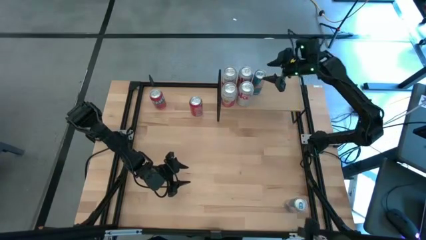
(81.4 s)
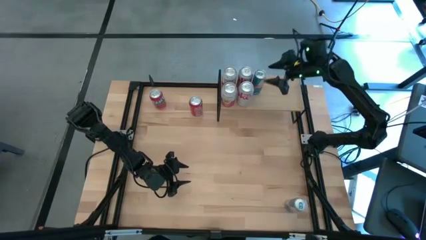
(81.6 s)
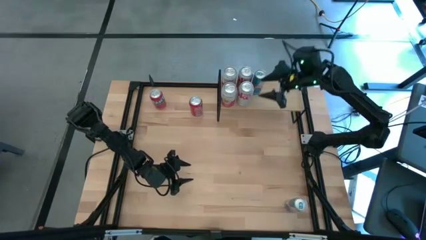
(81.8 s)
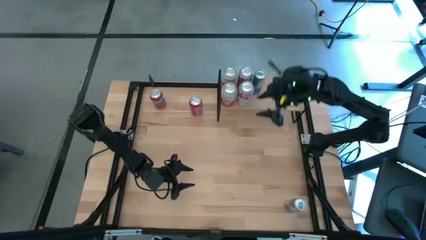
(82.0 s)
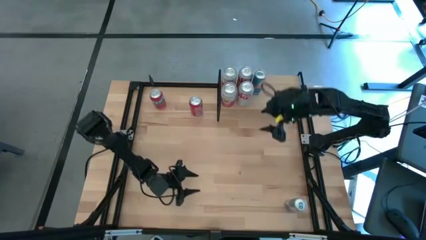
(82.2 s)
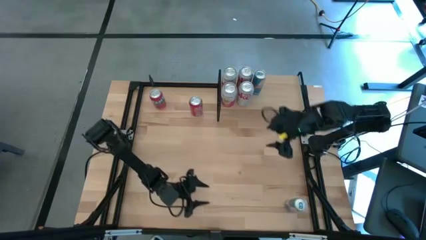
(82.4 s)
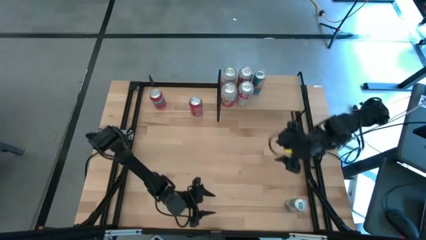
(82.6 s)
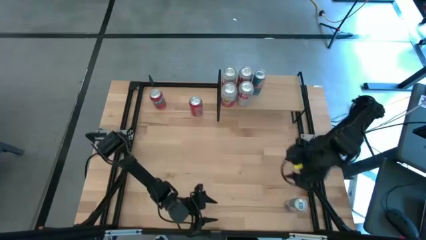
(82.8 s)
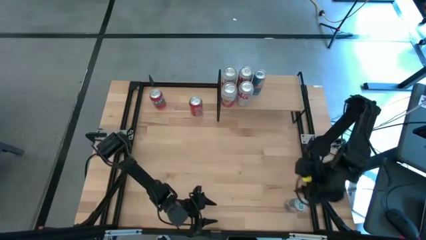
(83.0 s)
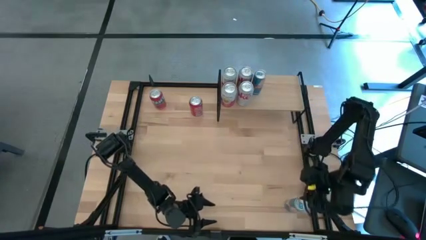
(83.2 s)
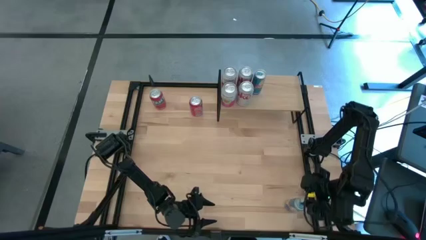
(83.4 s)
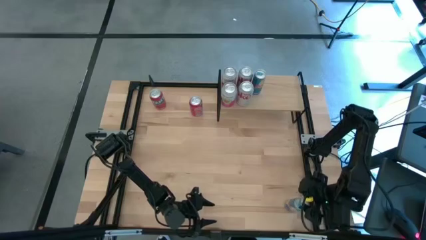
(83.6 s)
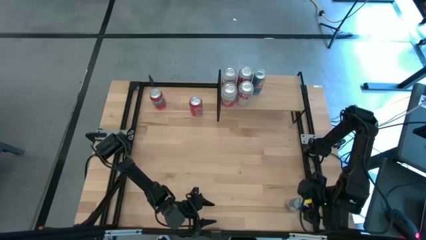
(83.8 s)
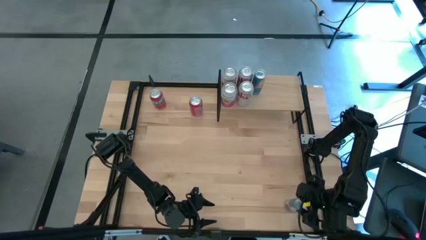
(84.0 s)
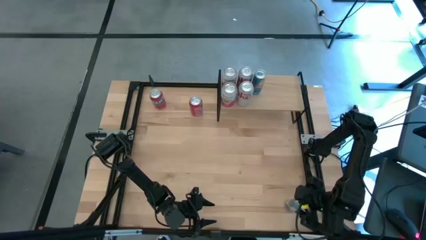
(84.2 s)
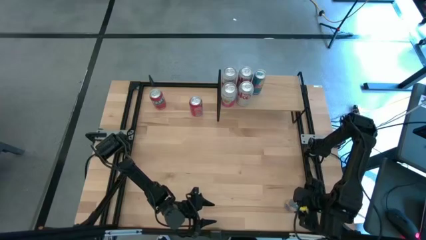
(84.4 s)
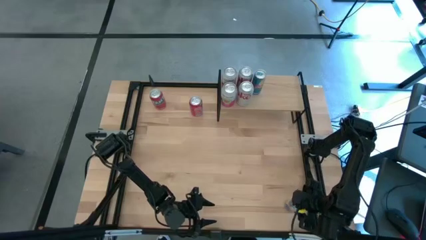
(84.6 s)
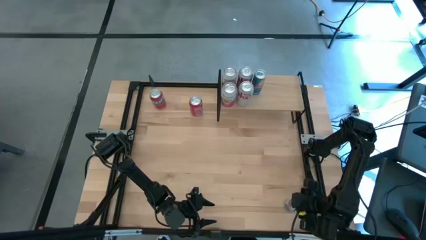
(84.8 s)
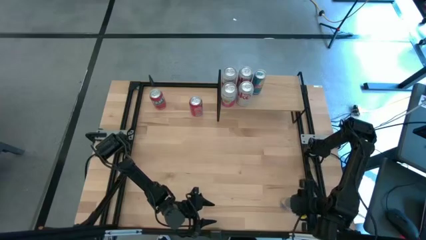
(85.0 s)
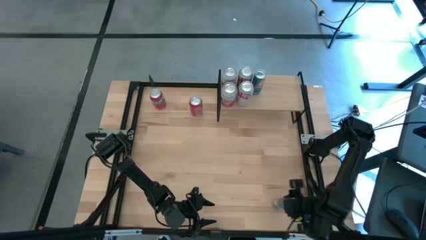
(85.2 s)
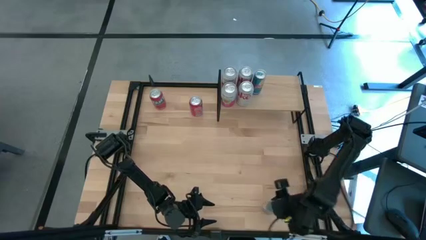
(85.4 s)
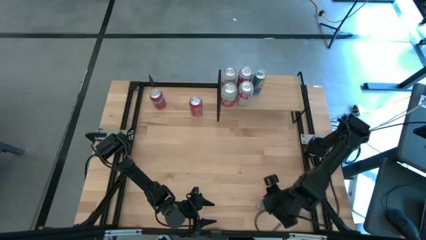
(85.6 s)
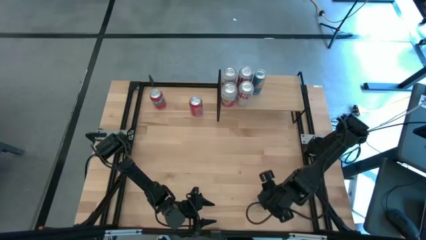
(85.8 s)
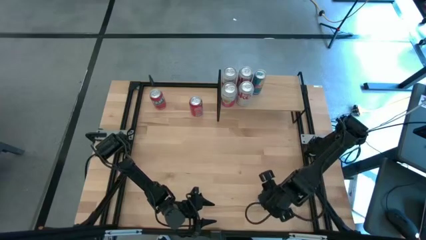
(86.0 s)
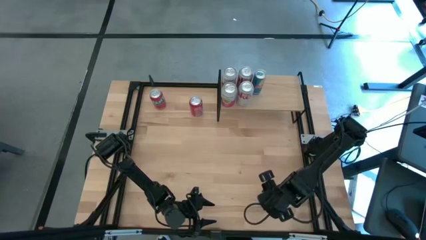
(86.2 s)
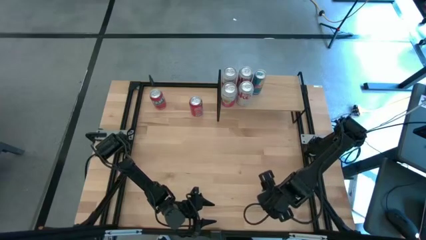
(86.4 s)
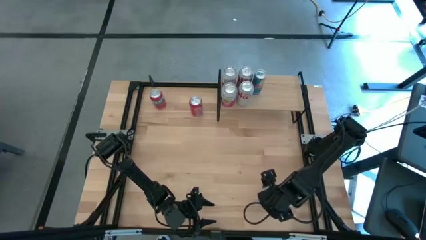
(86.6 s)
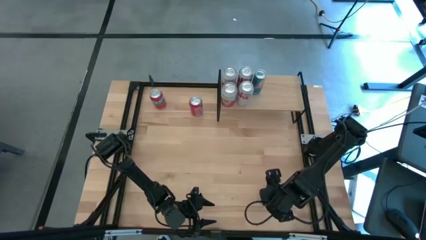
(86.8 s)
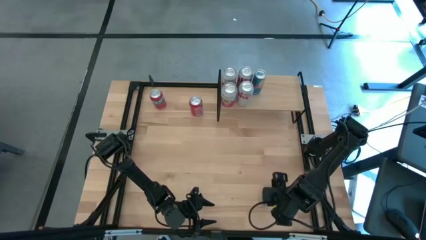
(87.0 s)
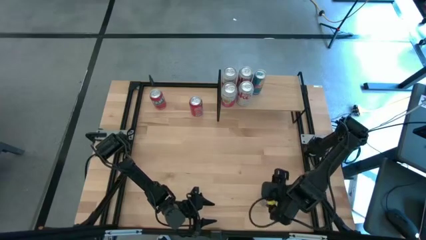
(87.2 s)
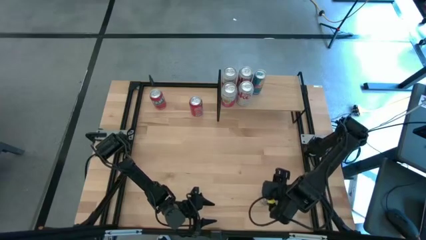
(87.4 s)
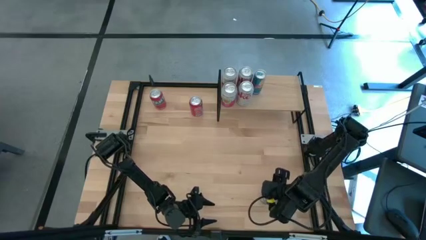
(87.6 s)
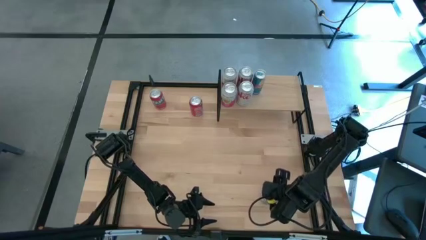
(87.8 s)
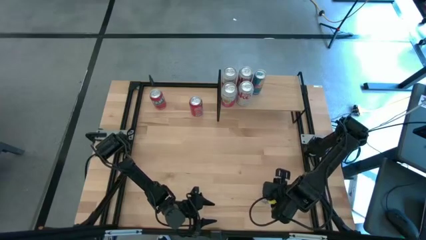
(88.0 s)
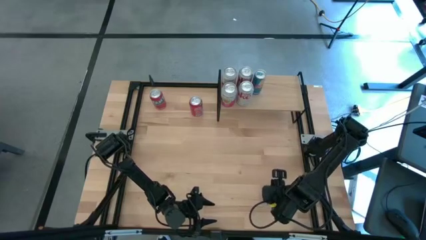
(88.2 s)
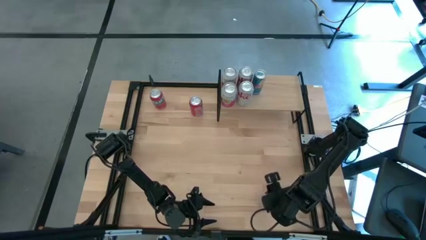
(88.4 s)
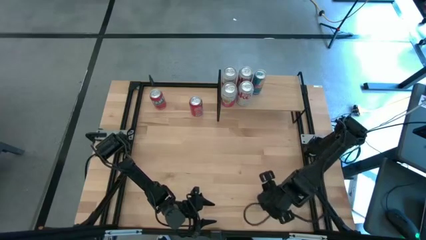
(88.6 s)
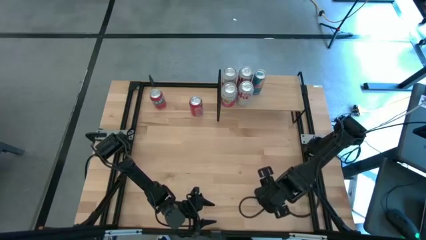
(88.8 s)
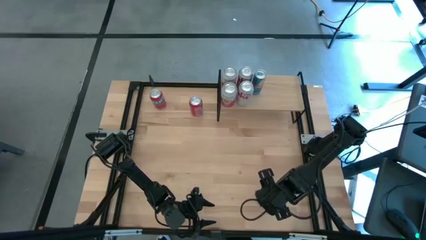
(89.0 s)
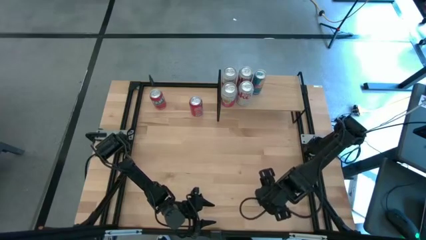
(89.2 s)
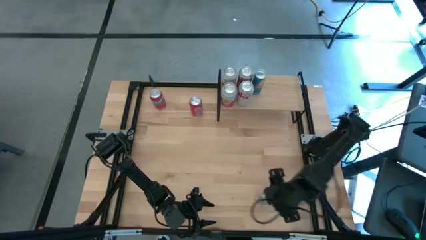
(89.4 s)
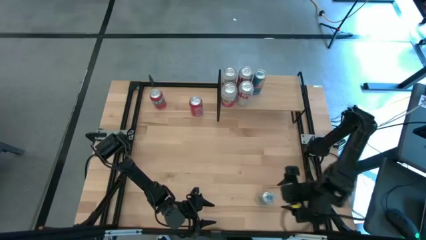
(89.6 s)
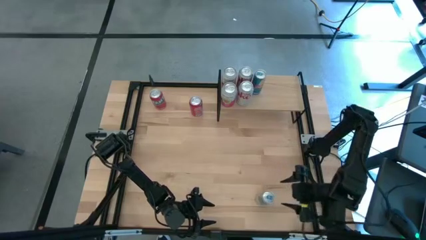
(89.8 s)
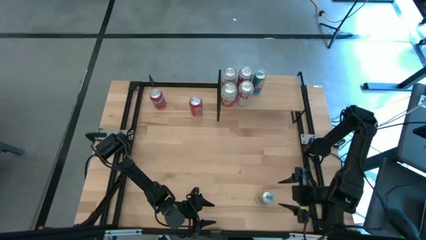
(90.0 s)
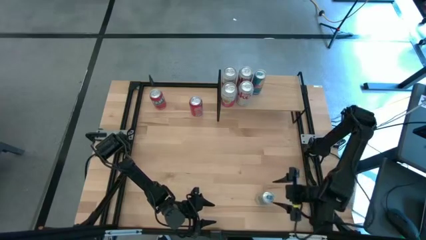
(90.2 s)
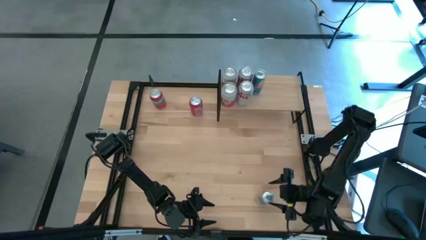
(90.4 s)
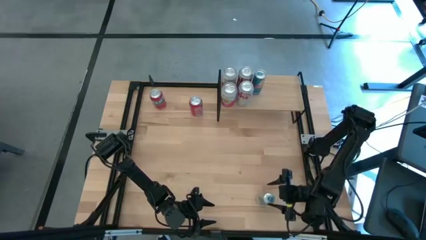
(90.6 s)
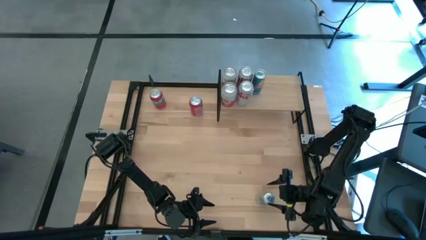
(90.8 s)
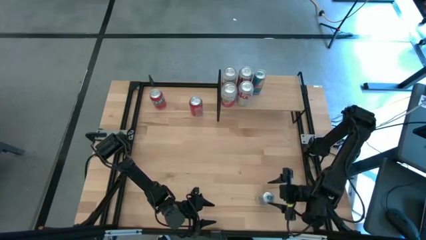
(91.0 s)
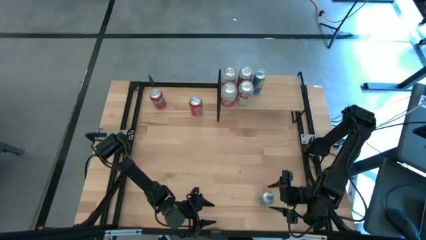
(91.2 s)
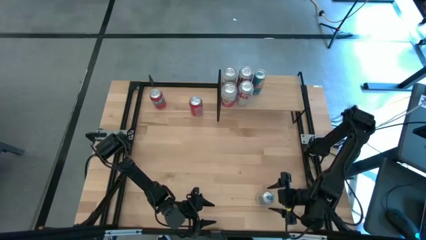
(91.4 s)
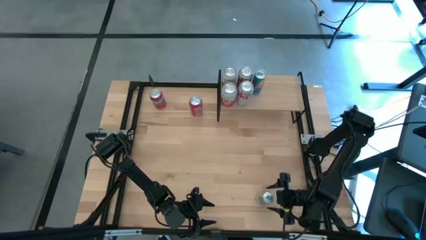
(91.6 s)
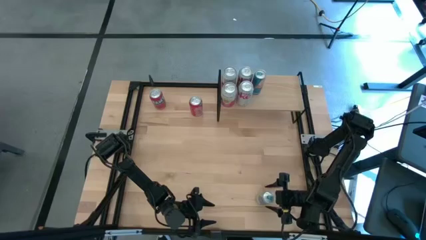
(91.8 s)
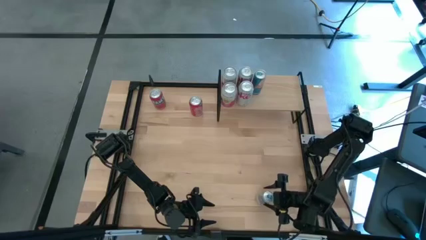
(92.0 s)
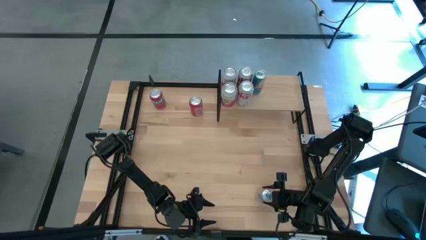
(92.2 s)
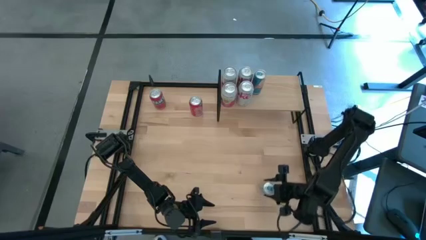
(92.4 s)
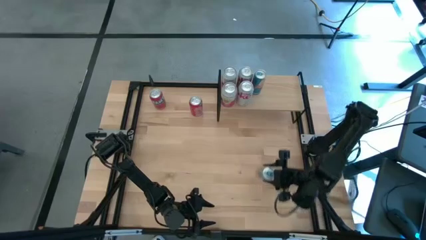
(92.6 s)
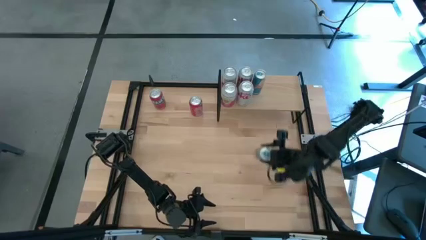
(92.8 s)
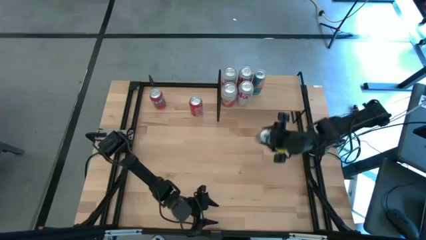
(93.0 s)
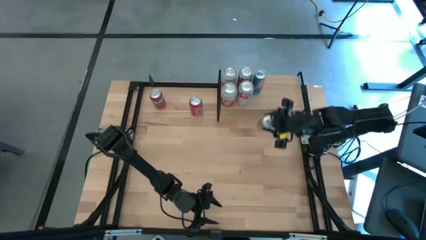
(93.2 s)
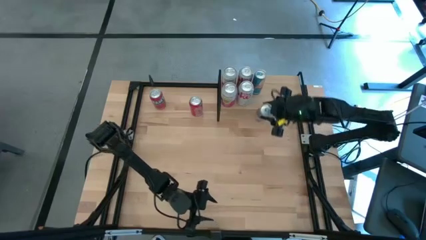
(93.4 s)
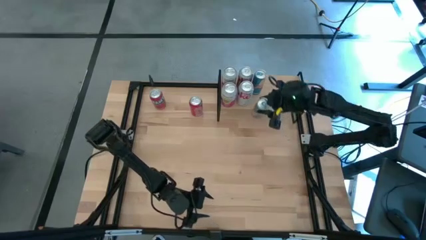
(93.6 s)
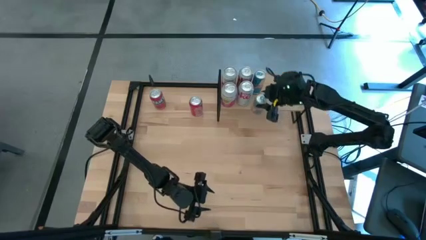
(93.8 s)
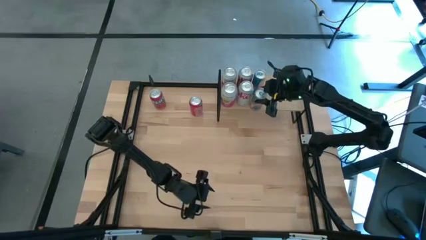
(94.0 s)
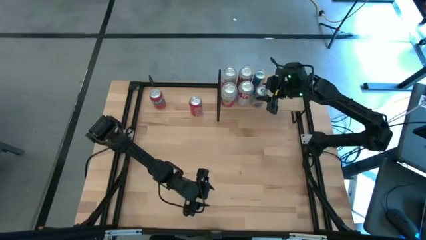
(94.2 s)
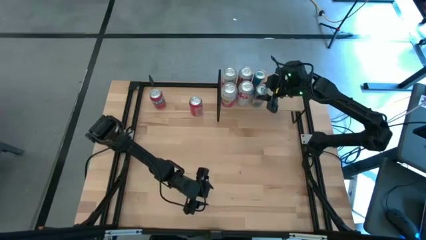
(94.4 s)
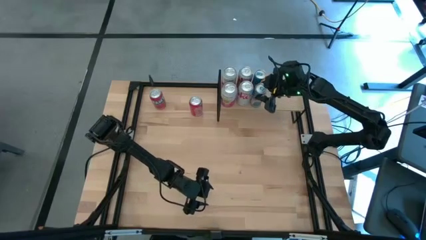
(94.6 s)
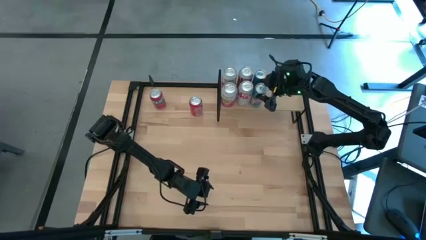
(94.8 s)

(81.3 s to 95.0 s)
Task: Place canned beverage on shelf
Put the blue soda can on the shelf aligned with the other blue soda can

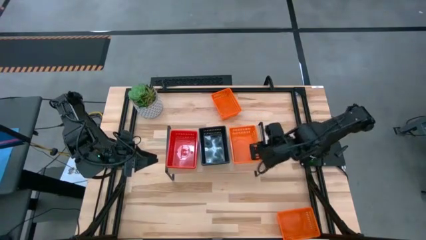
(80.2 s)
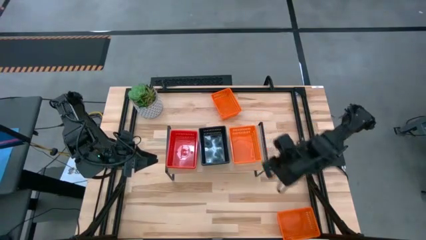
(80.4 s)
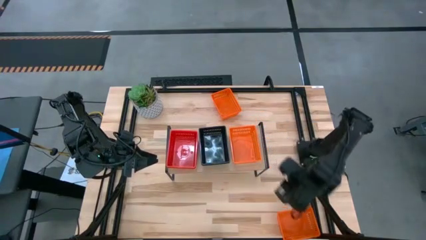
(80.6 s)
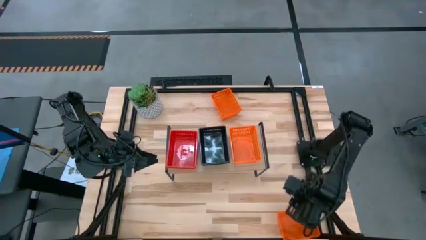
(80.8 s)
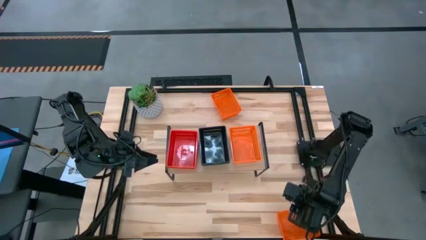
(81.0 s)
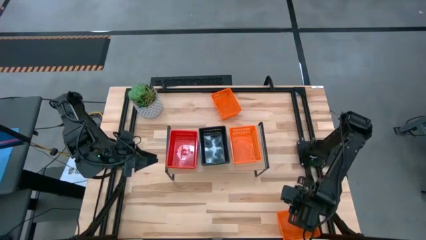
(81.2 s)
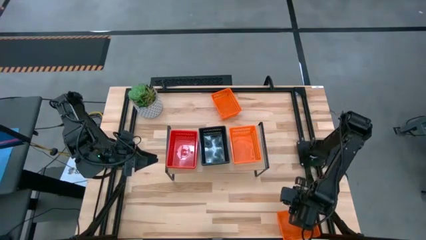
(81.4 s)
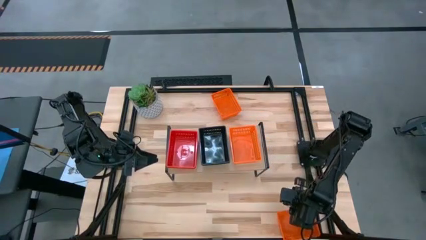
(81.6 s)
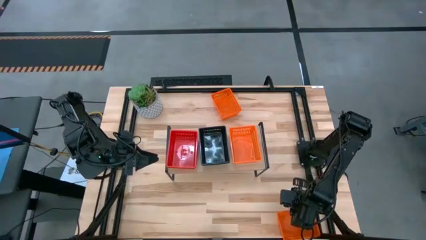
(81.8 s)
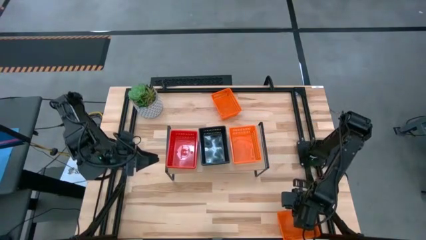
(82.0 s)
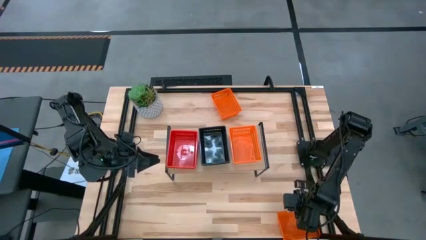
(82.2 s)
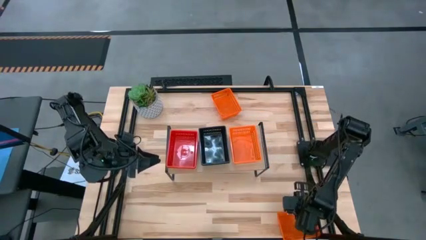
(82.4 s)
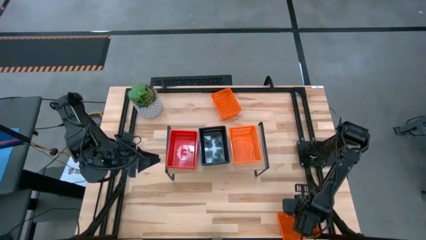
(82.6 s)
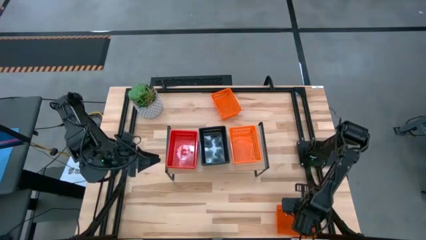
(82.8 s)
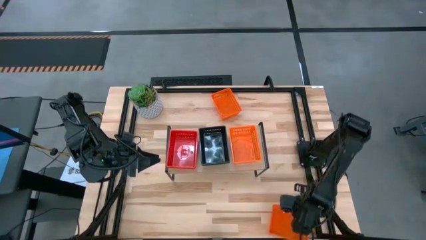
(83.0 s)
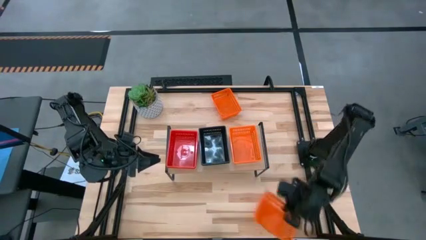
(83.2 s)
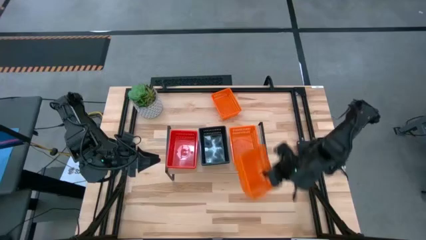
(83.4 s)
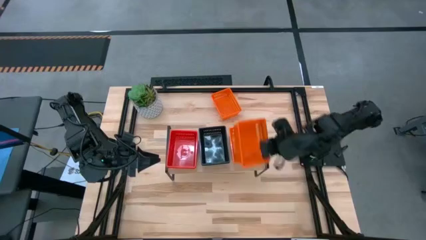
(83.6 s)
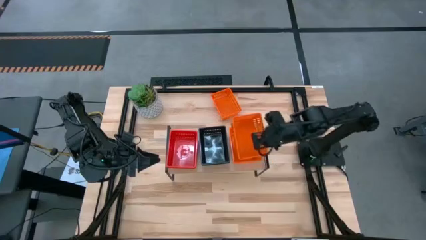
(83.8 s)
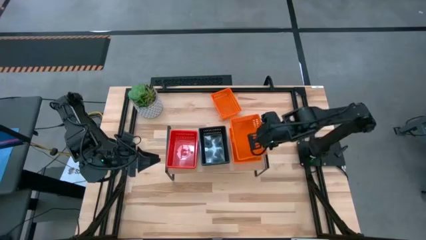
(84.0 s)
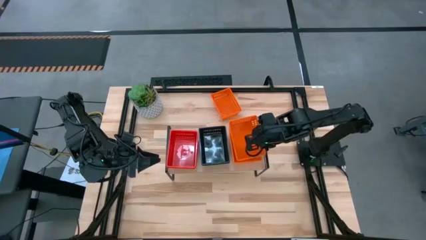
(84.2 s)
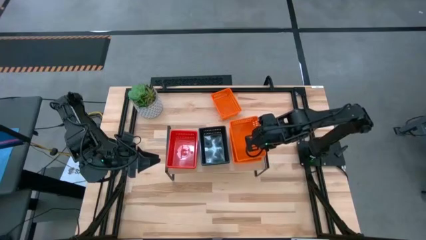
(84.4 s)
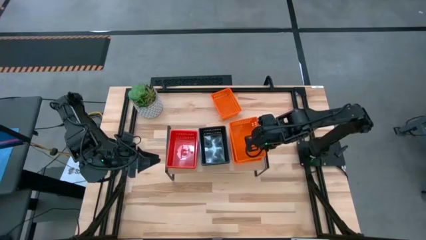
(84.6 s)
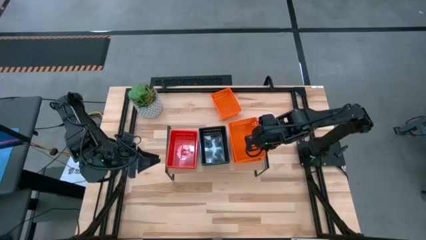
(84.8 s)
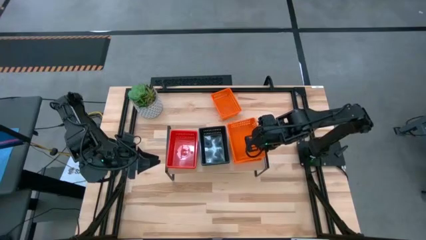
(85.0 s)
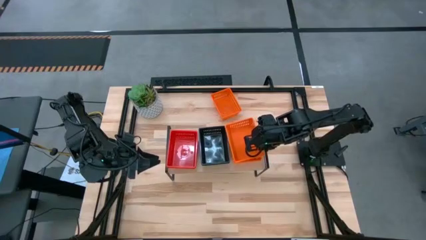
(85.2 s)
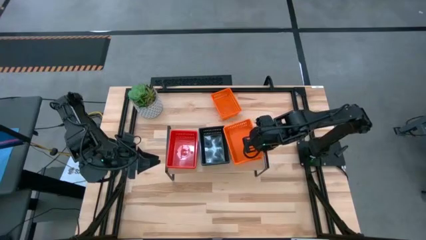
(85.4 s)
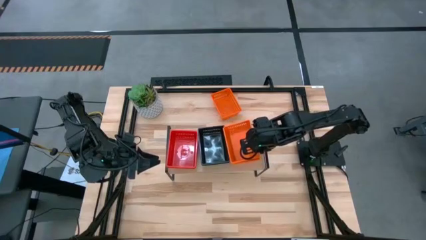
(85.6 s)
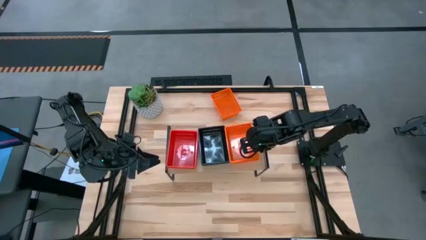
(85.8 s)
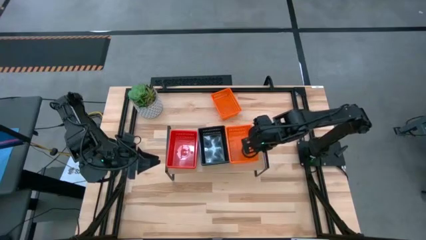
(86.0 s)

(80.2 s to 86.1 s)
Task: Stack baskets on shelf by color
Stack the bottom orange bin on top of the other orange bin on the shelf
